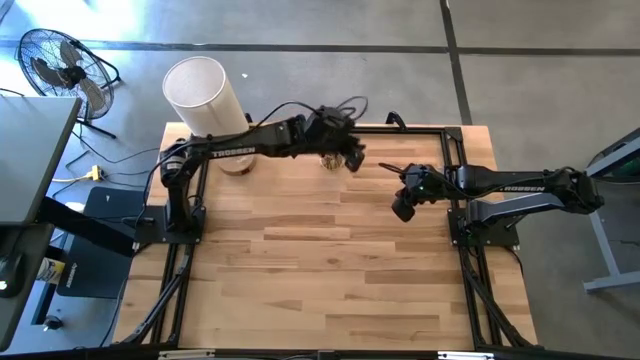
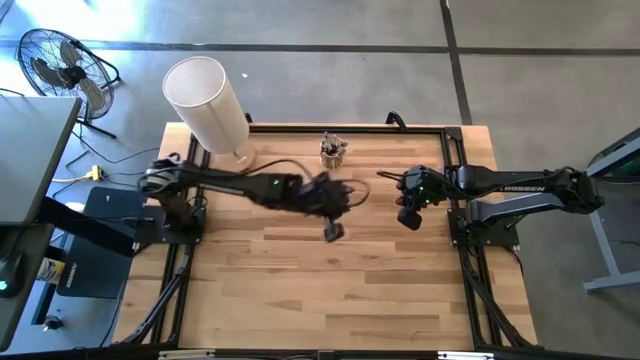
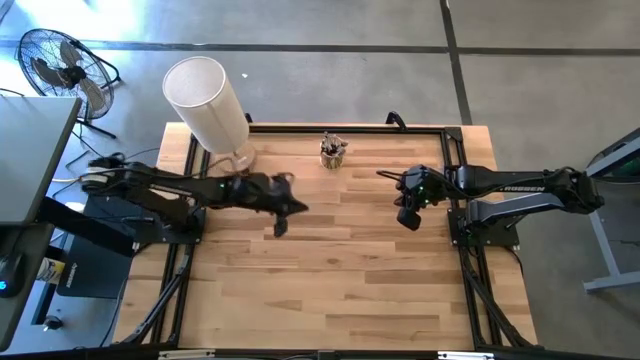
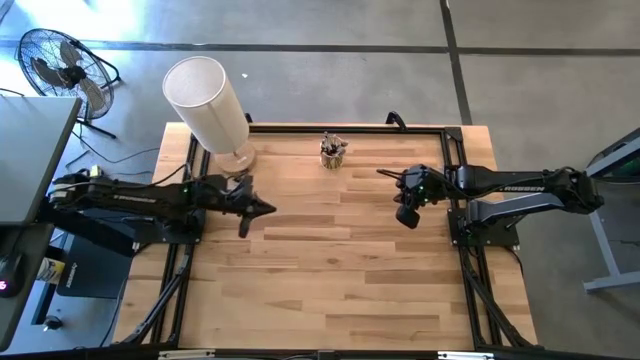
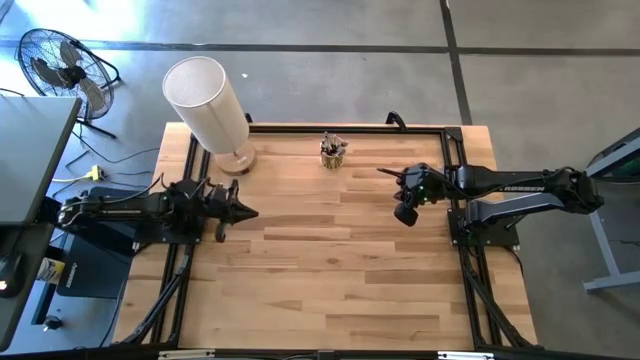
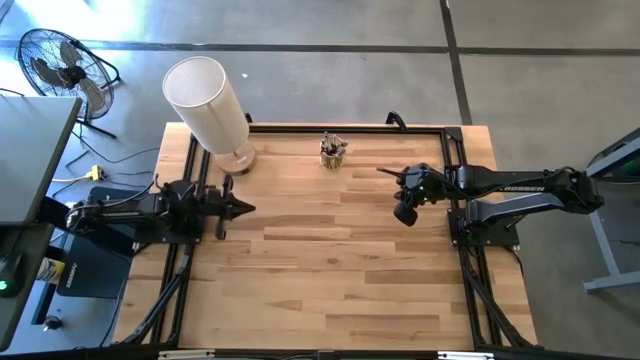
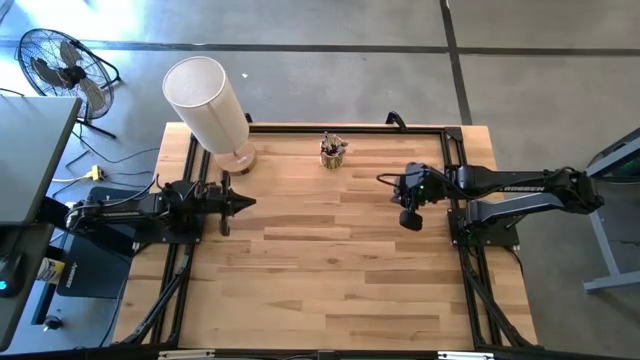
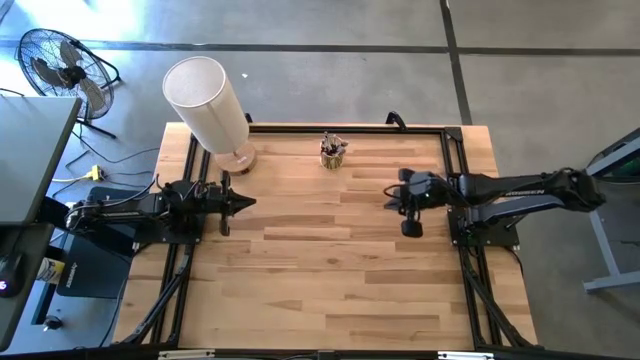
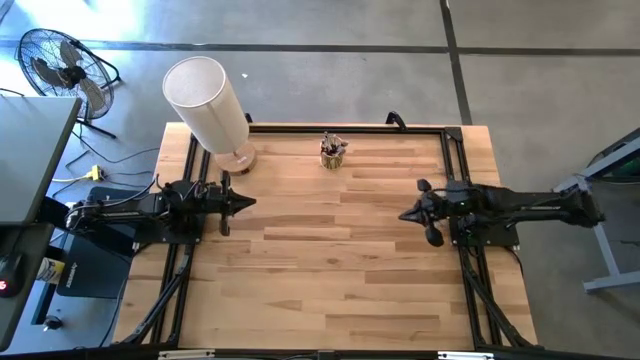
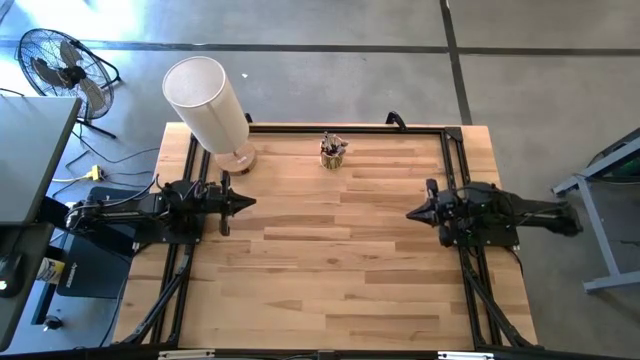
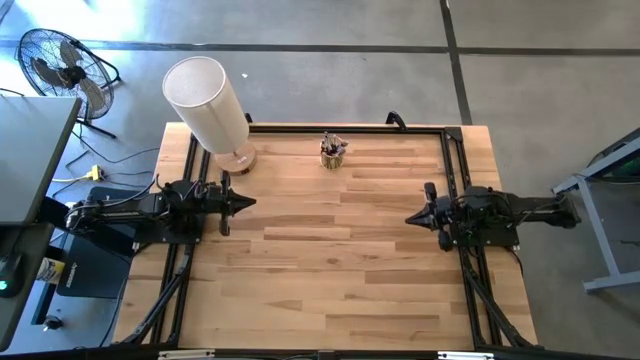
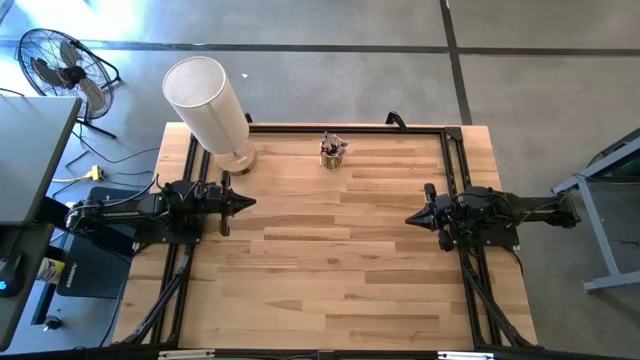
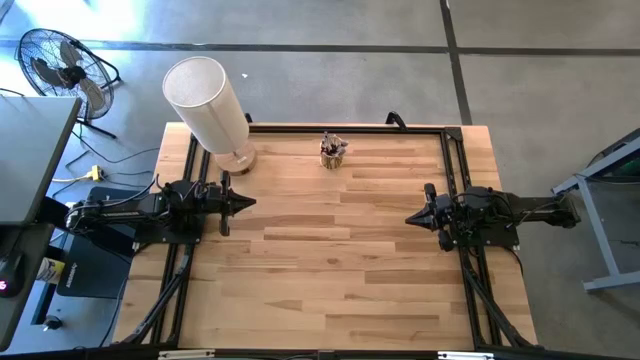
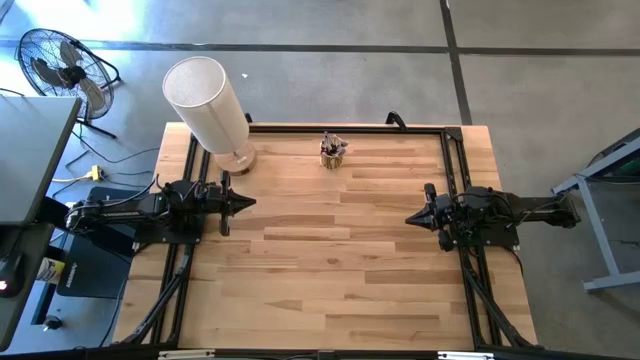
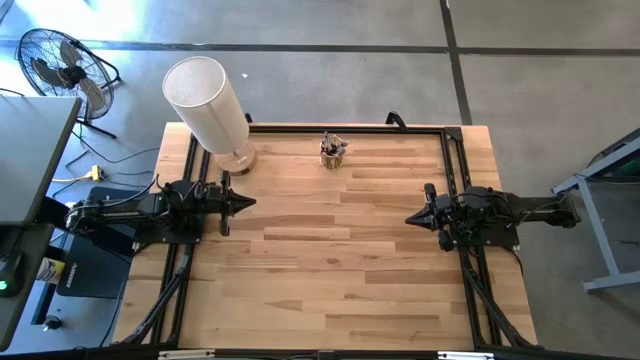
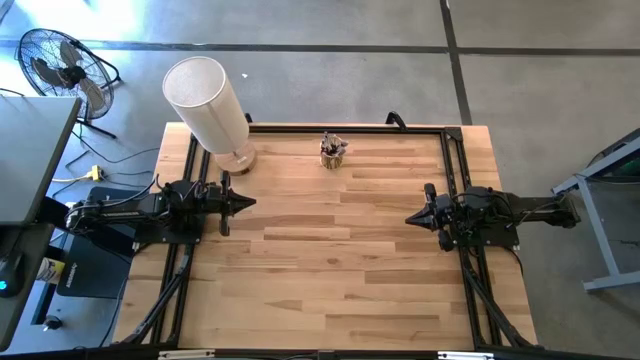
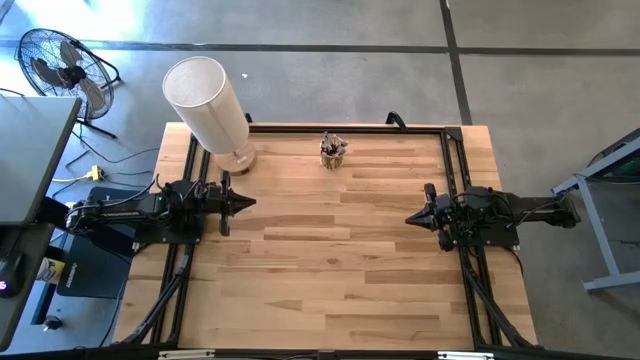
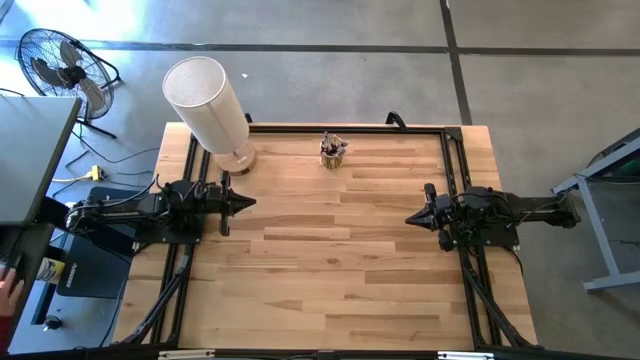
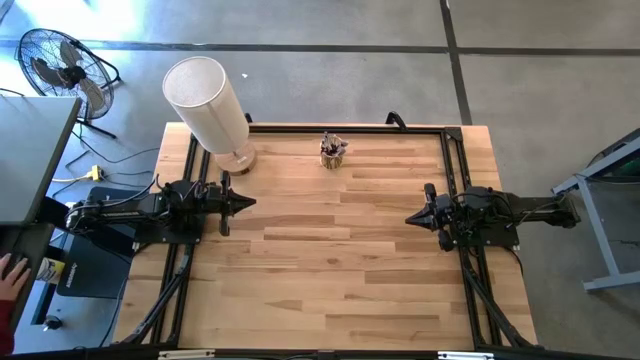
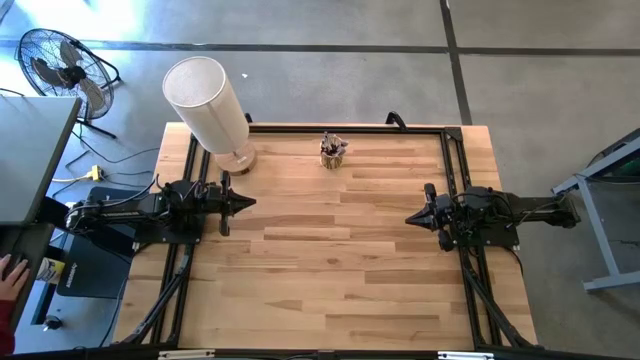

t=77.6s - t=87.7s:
Task: Sort items
Return to Home Position

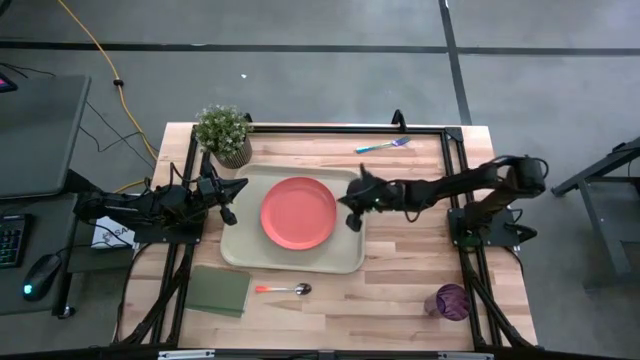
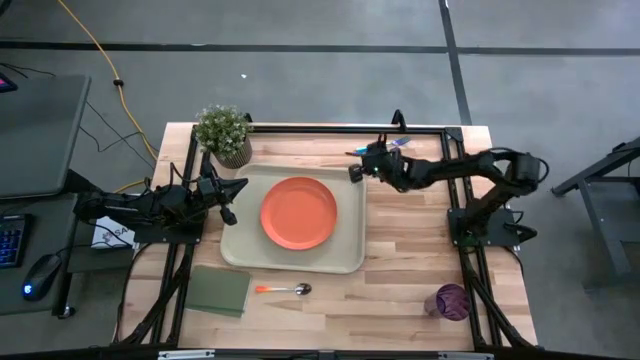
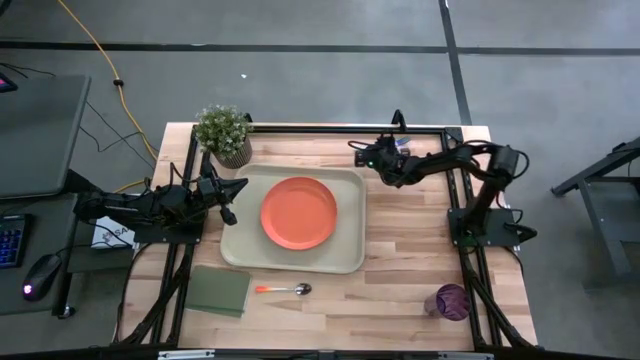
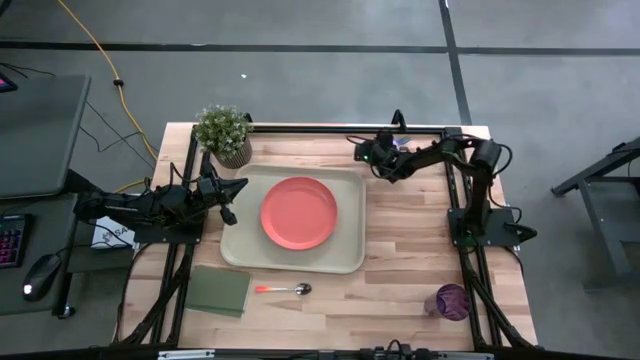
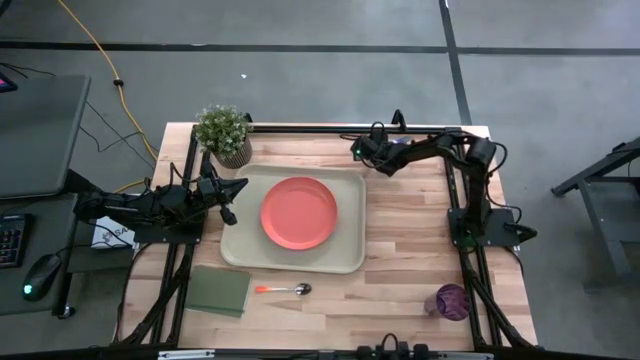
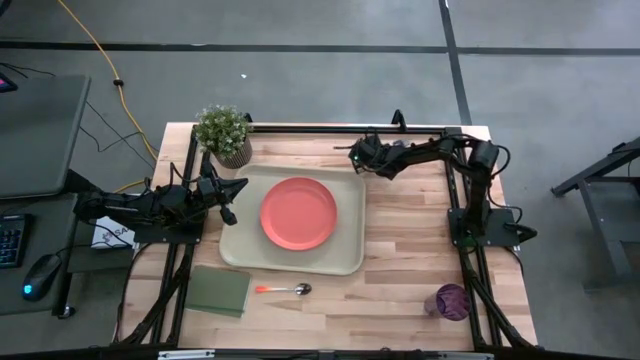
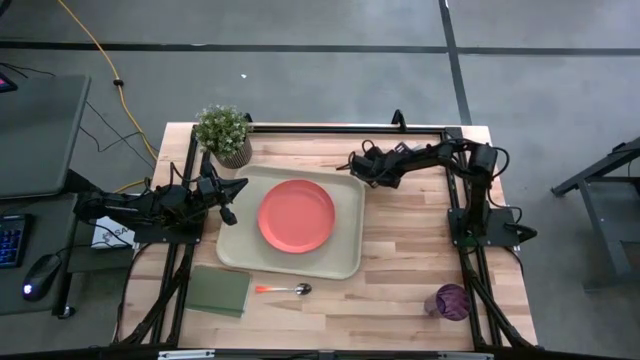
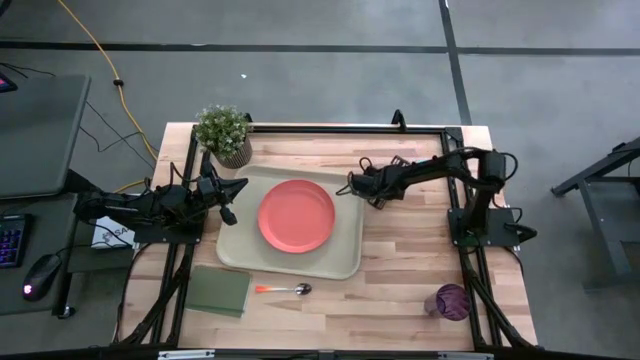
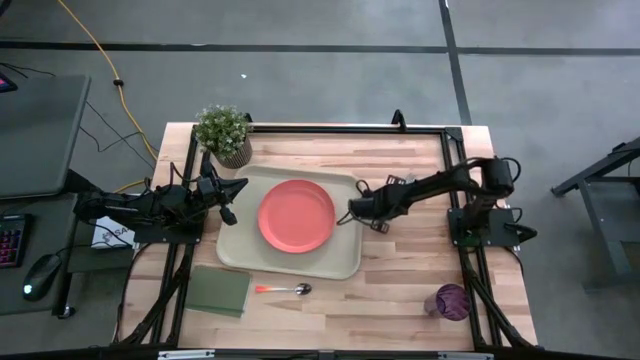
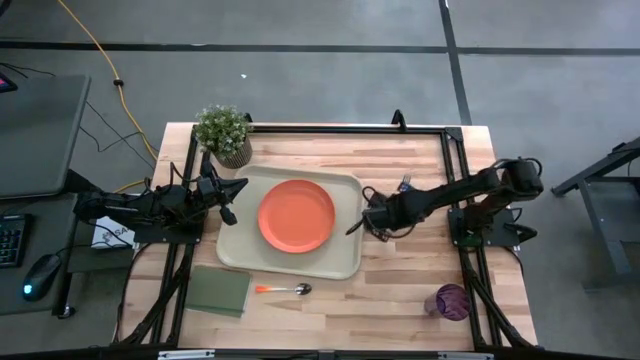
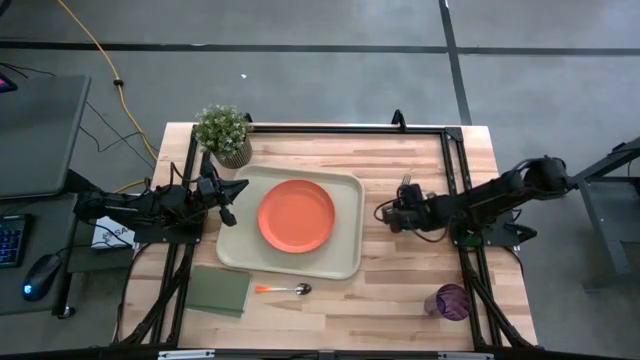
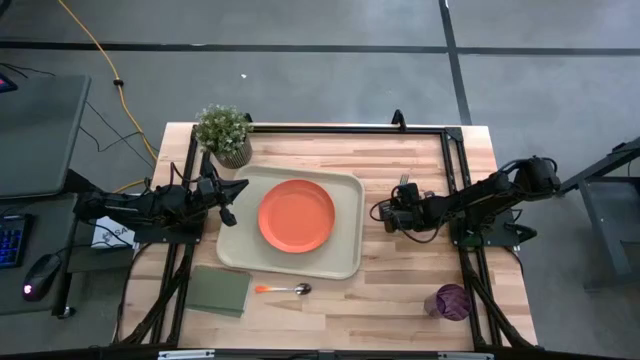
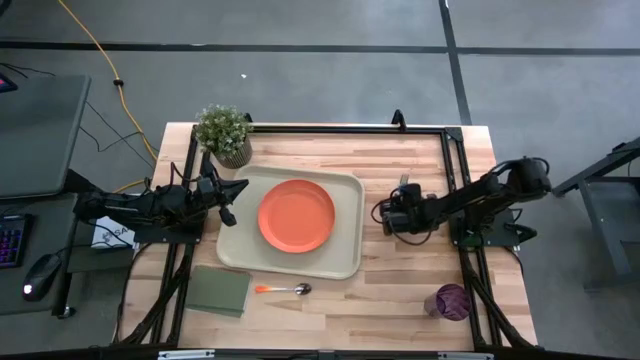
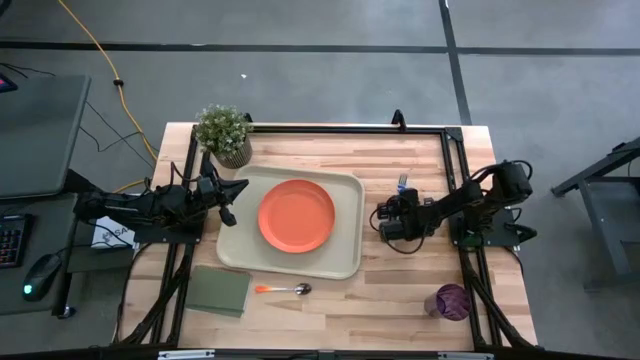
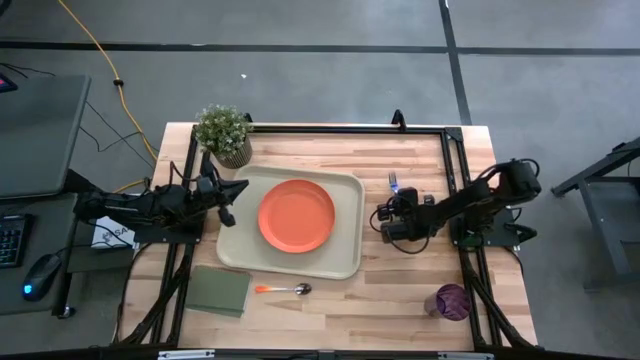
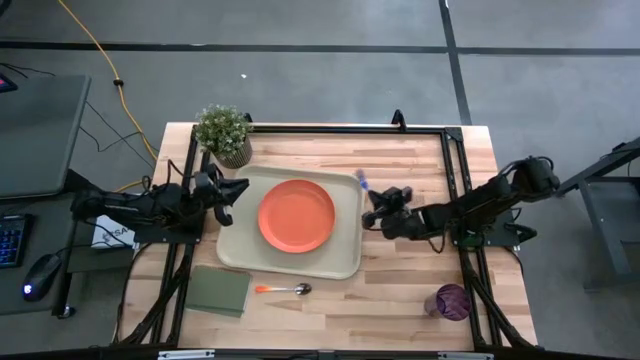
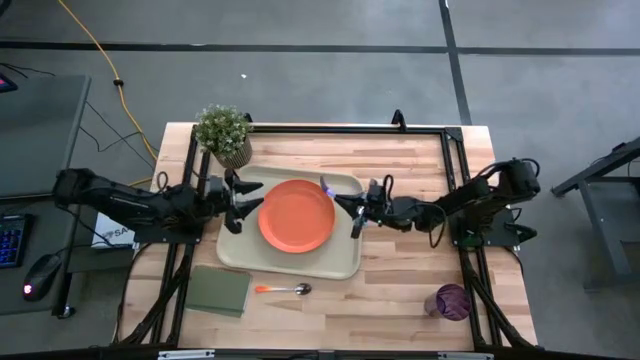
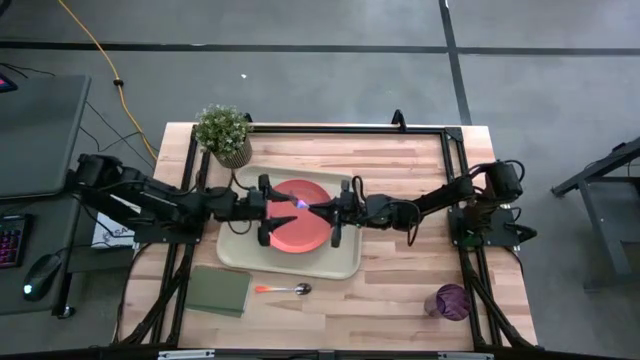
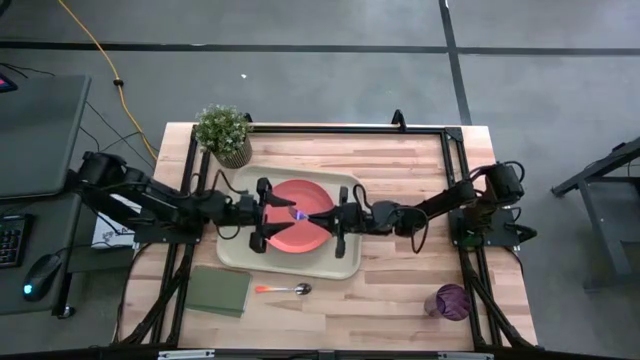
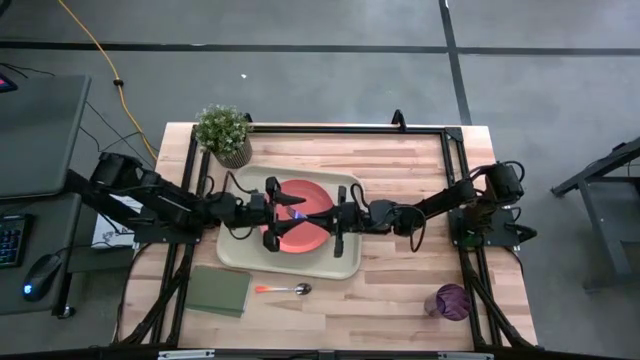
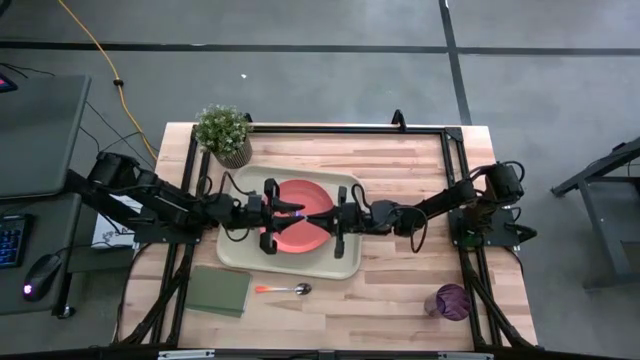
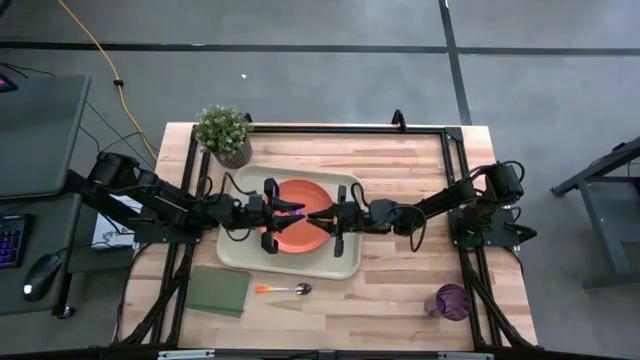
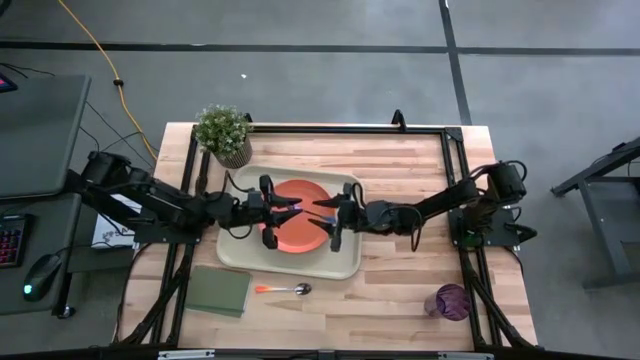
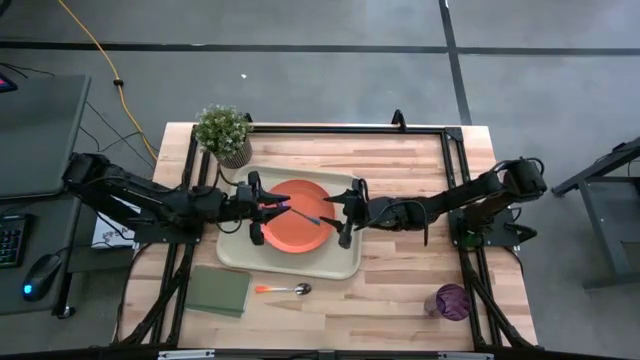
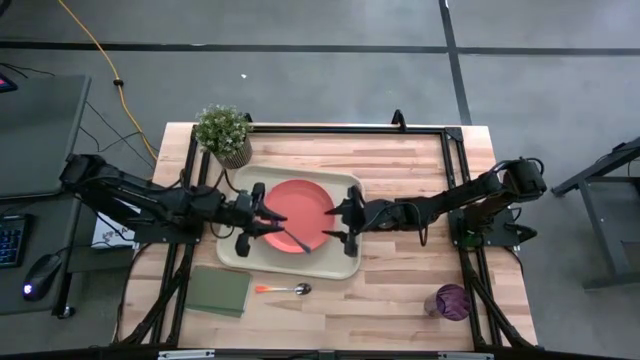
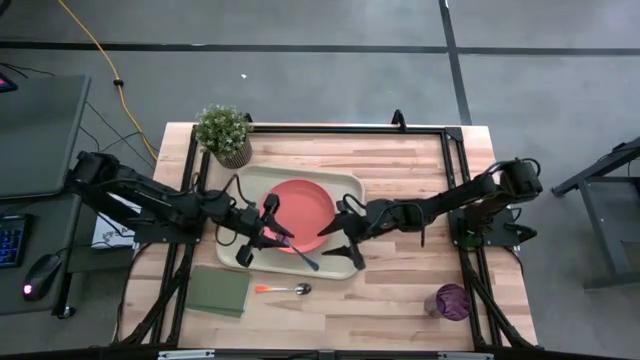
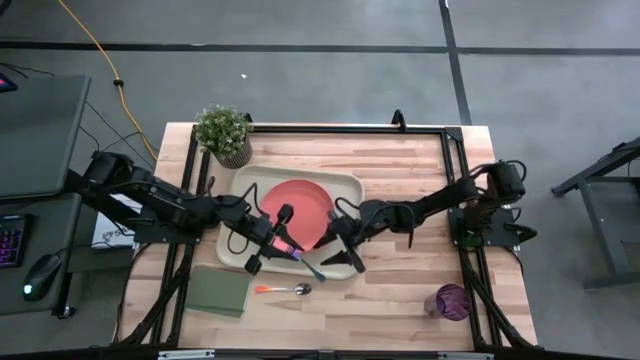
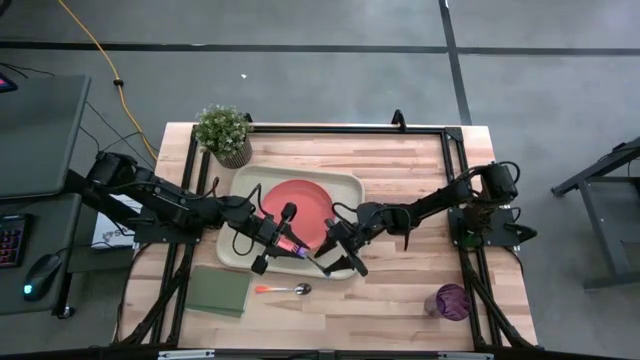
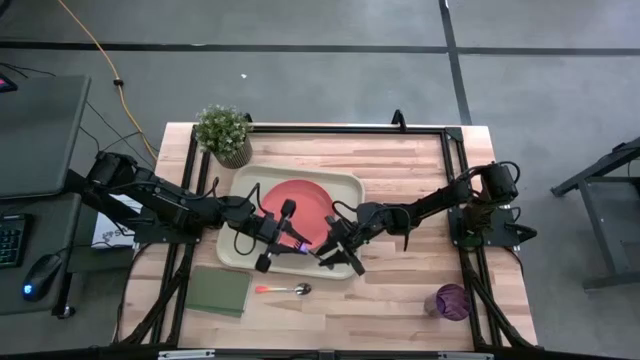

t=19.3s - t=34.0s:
Task: Pick and place plate/cup/fork/spoon on tray
Put the blue fork on the left side of the gray tray
